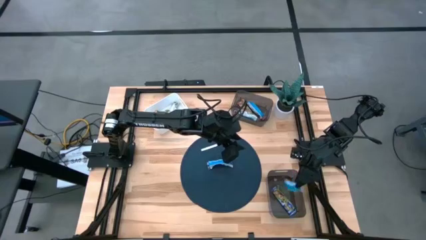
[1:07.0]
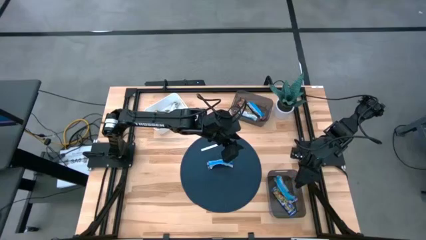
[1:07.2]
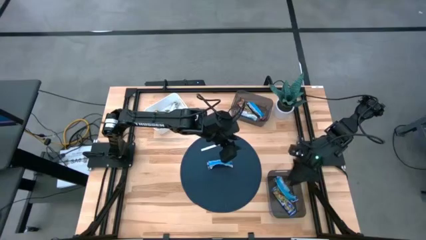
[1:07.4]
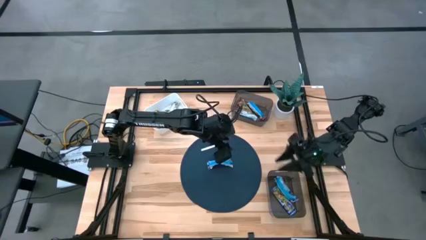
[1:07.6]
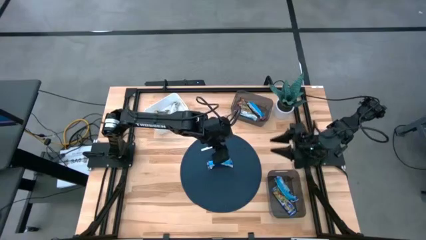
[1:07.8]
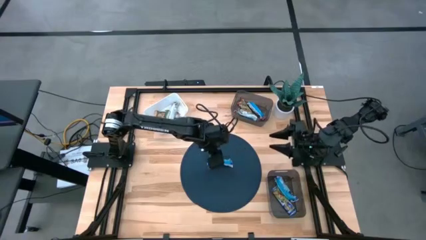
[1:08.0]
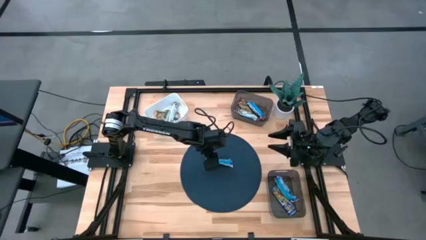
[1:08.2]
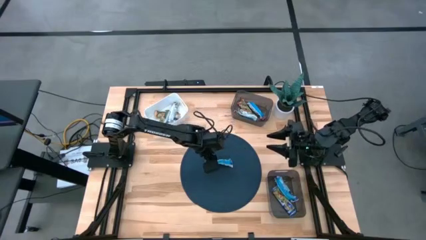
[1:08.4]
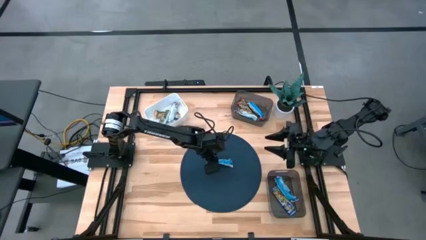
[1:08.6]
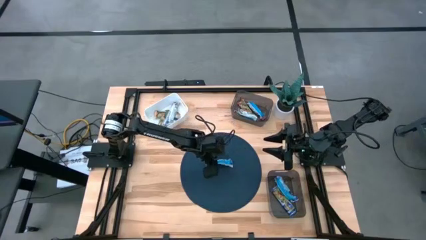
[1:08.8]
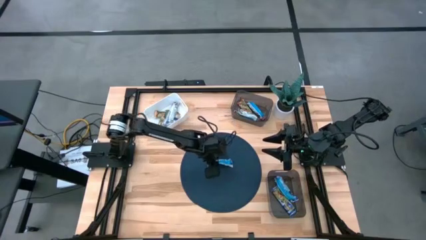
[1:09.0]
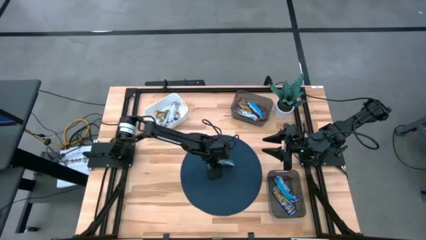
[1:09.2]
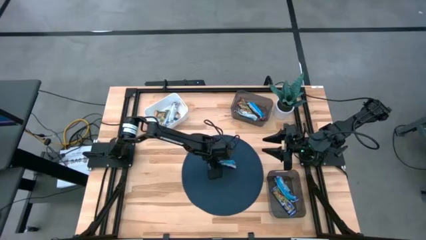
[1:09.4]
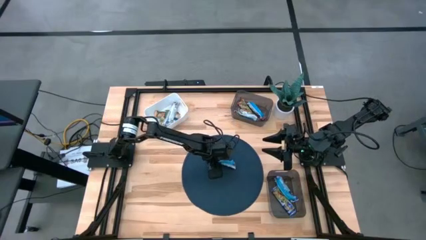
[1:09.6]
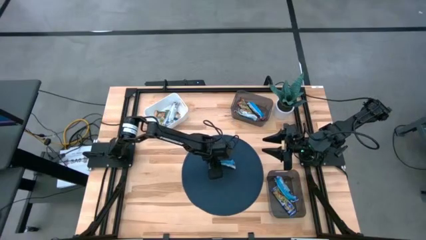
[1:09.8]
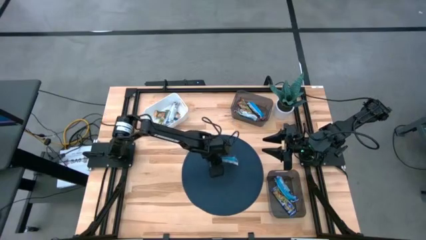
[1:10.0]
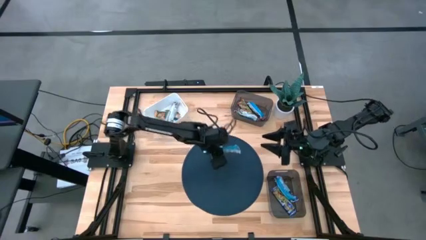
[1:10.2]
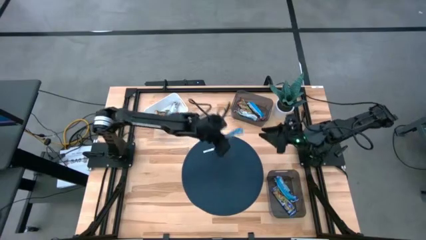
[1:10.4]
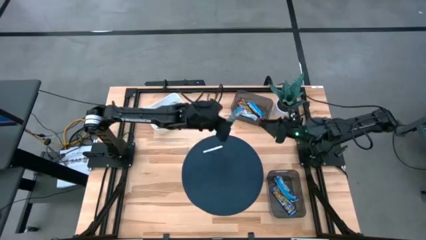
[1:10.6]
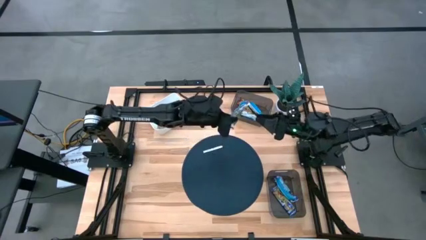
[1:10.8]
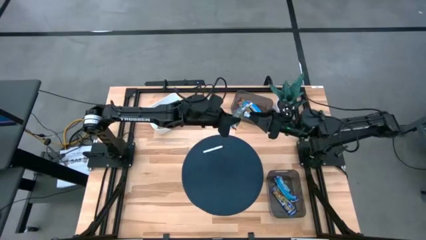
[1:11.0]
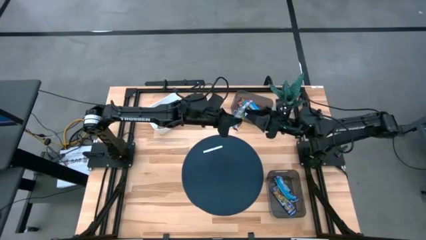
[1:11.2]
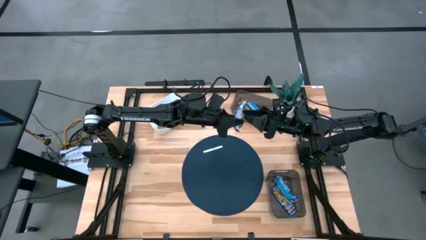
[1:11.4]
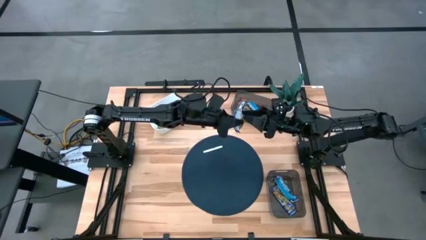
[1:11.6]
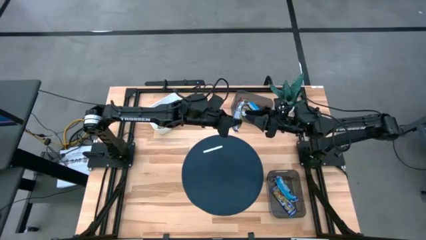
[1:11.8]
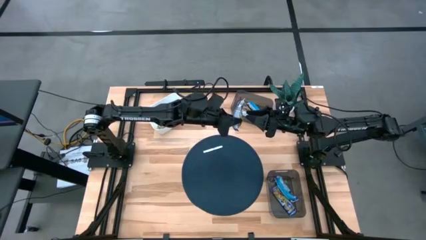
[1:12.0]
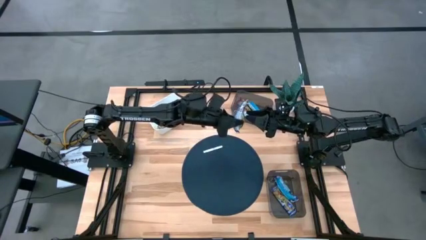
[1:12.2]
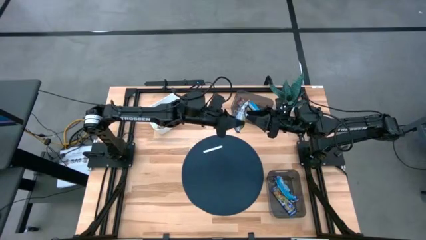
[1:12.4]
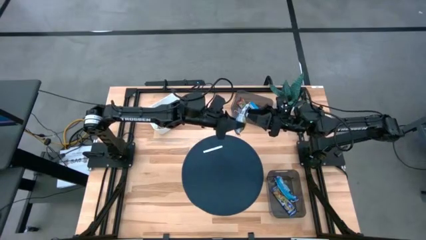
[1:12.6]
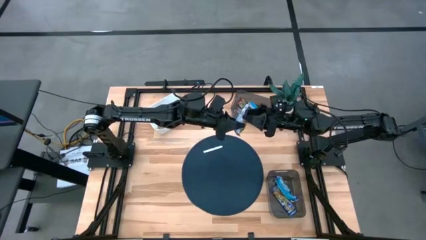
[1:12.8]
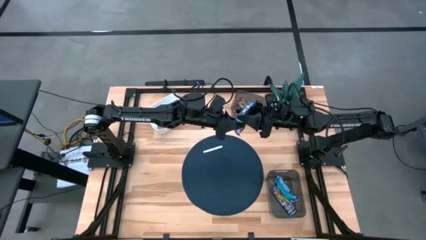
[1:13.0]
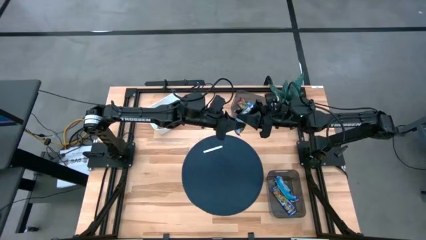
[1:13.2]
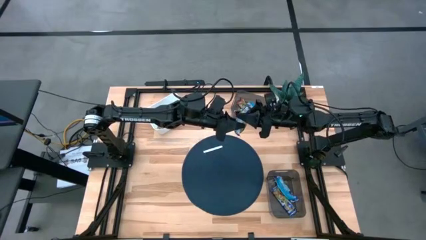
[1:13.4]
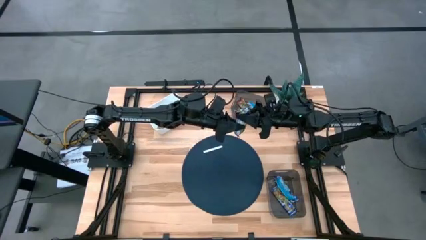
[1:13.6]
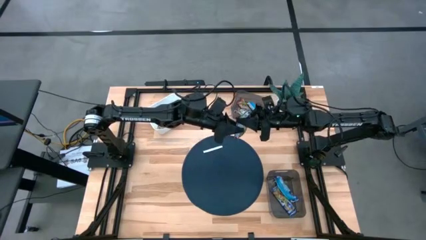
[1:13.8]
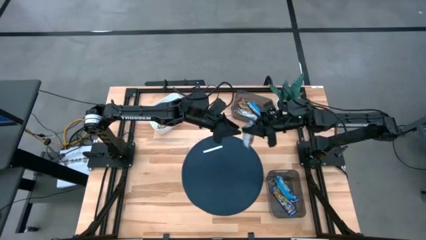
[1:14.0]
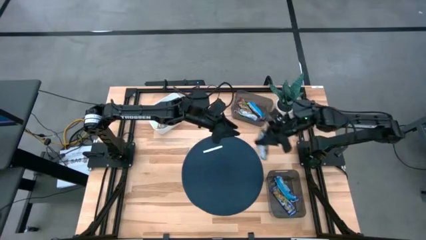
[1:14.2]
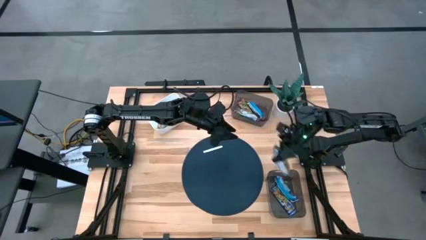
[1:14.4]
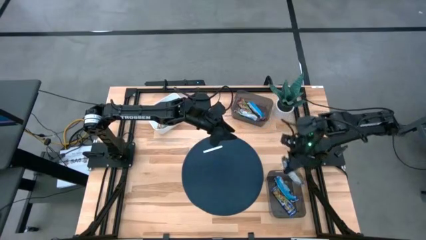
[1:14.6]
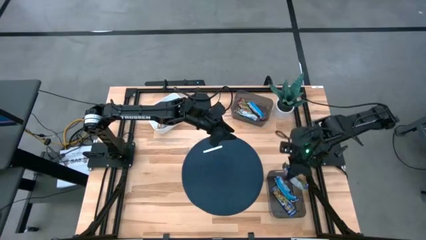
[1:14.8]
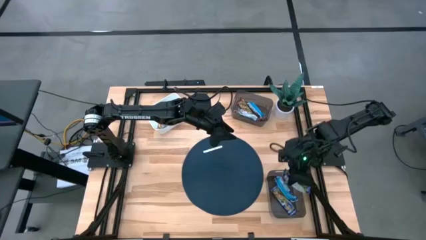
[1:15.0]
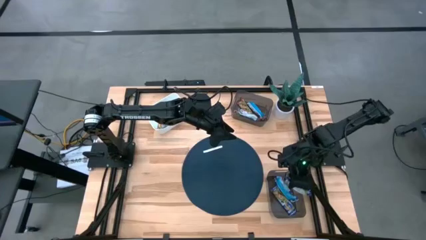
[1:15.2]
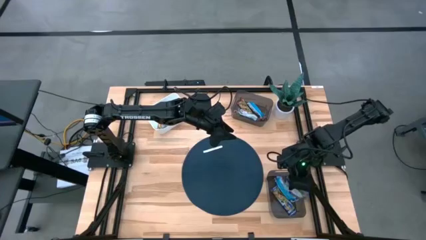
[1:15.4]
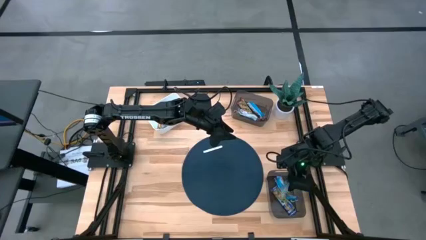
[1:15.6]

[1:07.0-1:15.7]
Task: Pick and place Granola Bars by type
Put the violet granola bar into the bottom black bin

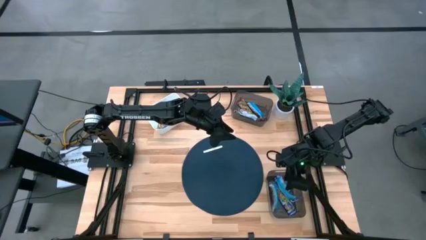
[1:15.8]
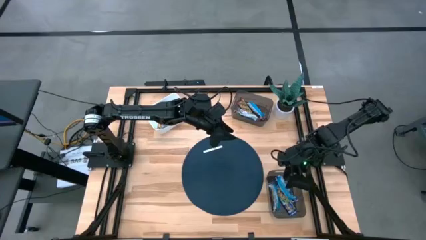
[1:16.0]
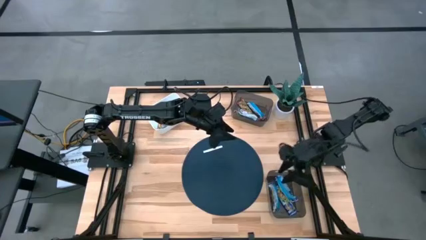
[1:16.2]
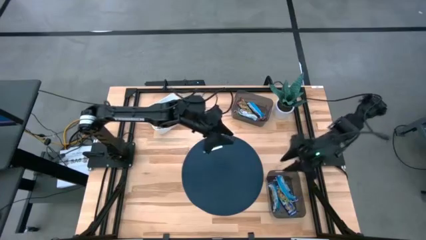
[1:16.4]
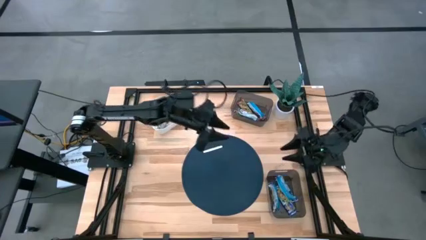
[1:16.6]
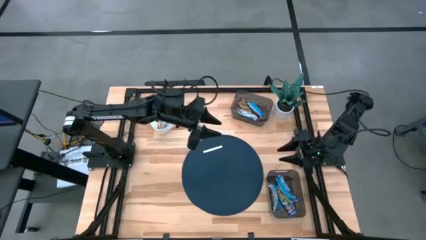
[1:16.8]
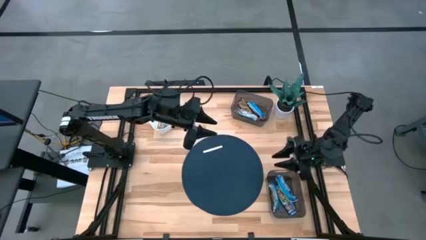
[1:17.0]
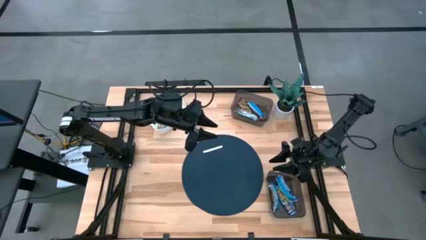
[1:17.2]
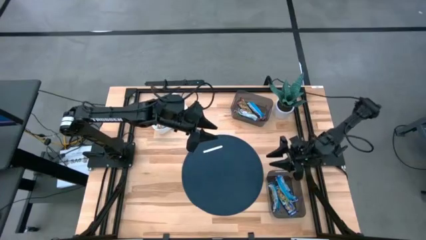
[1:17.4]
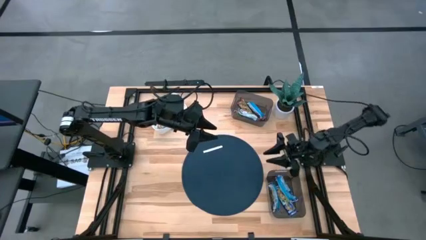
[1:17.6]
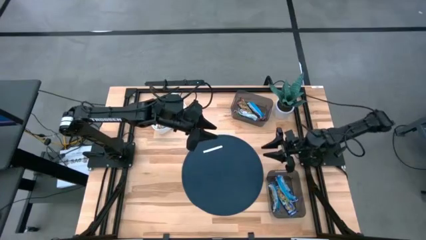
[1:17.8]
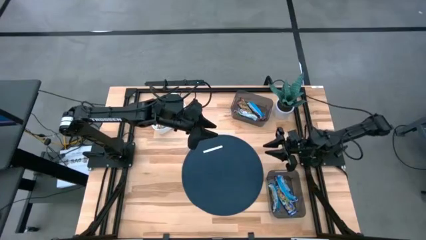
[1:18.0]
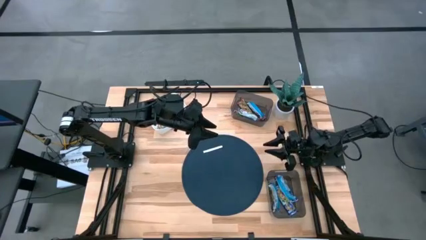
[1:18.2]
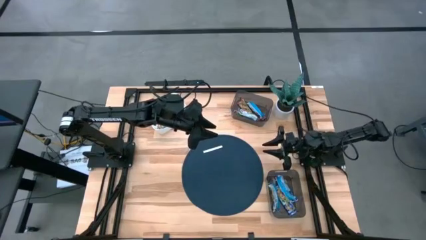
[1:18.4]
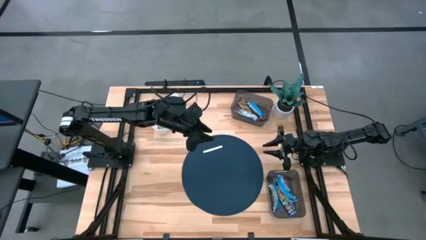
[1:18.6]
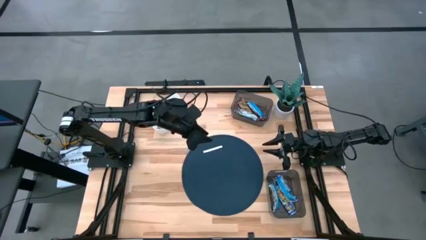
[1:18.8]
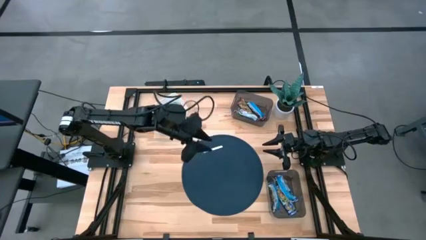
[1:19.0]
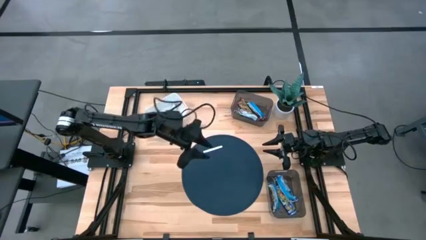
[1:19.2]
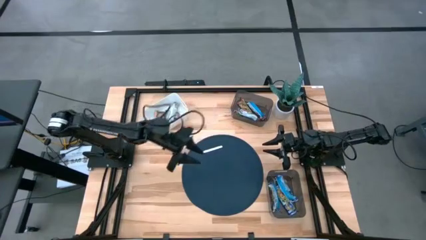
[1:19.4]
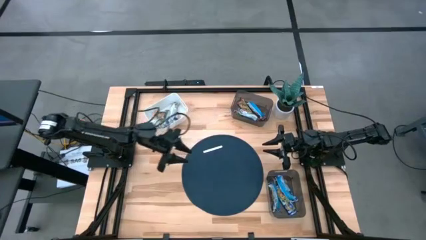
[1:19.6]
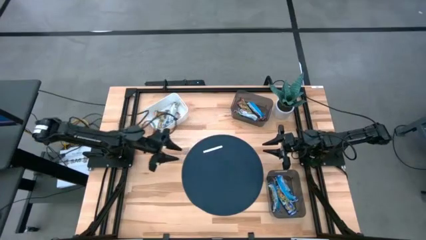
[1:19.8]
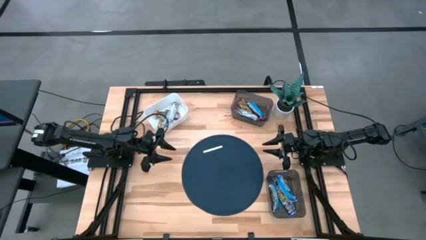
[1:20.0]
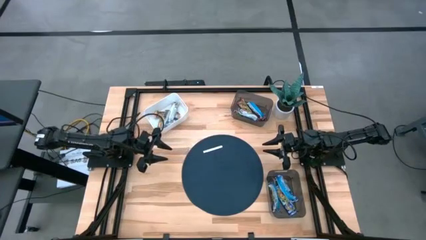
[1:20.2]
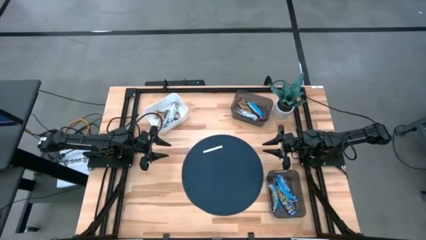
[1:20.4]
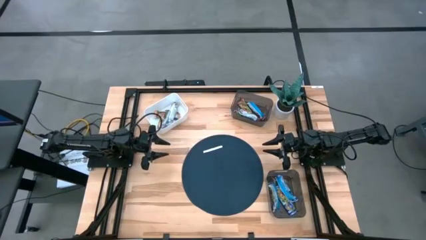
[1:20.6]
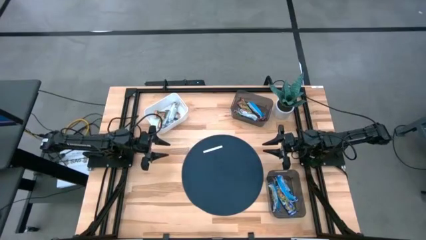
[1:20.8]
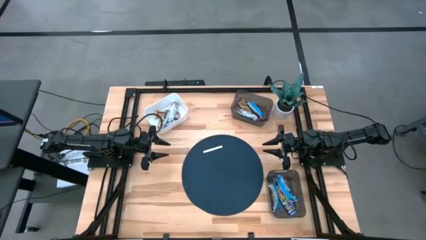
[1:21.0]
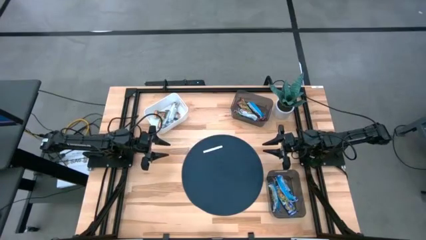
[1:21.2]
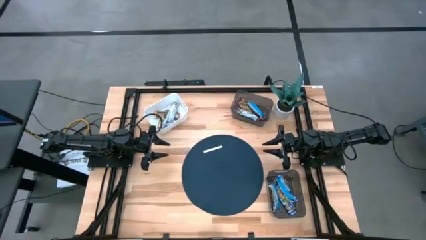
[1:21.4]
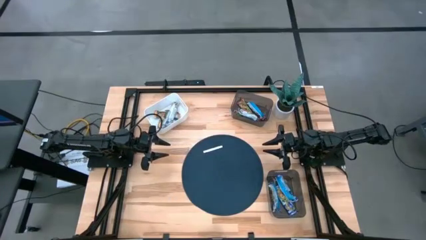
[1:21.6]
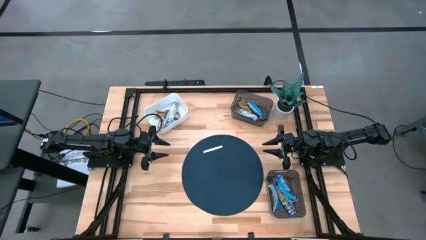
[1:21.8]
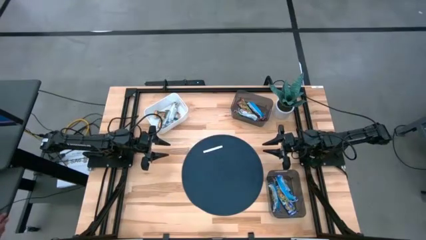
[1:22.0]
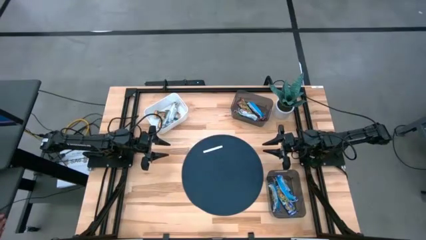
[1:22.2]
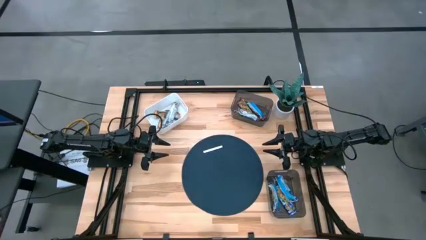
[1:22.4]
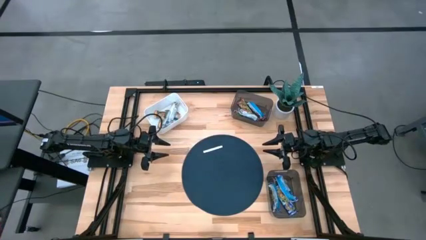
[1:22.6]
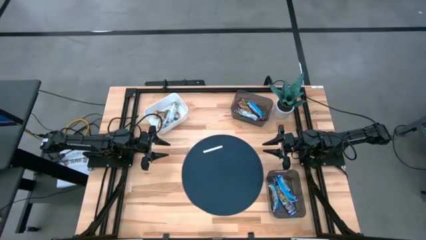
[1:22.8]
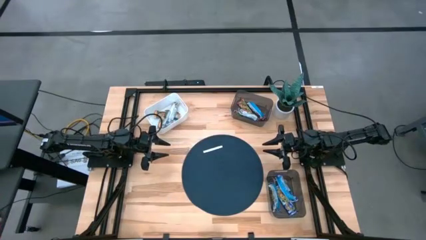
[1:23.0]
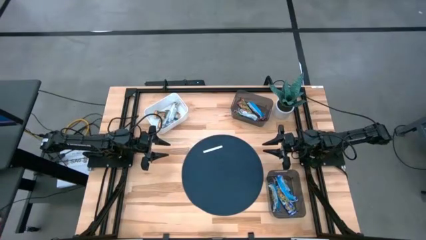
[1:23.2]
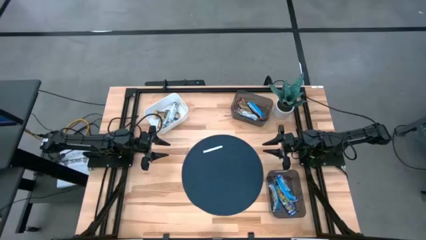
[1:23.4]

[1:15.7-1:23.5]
Return to Home Position
